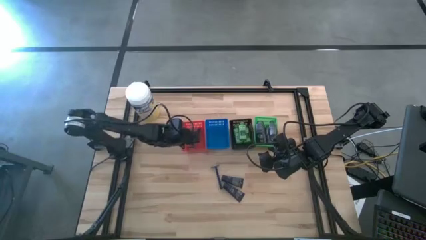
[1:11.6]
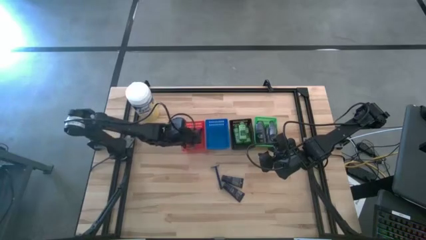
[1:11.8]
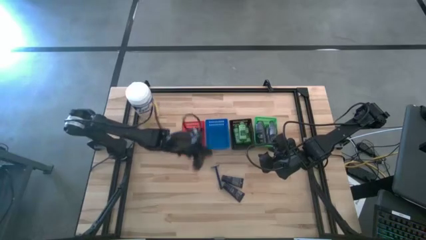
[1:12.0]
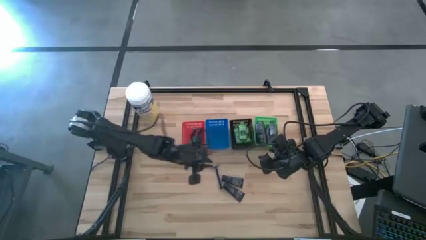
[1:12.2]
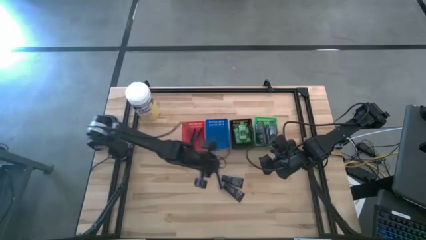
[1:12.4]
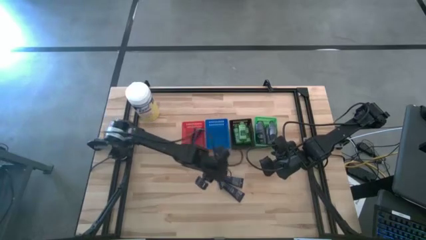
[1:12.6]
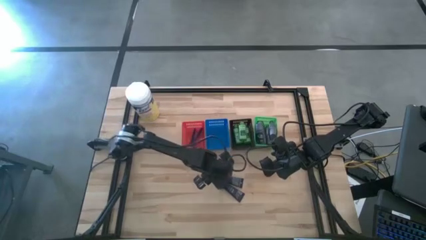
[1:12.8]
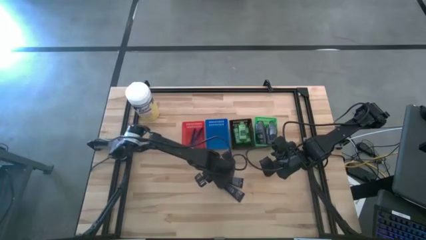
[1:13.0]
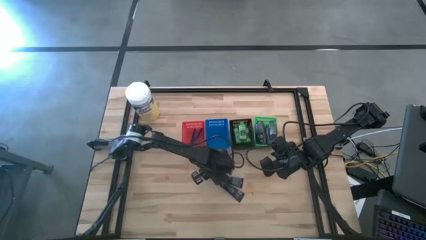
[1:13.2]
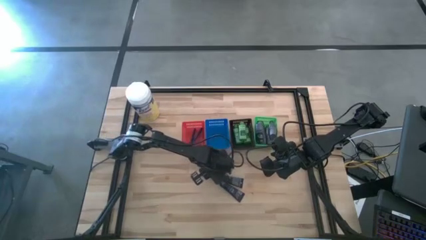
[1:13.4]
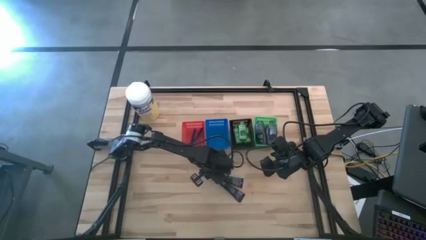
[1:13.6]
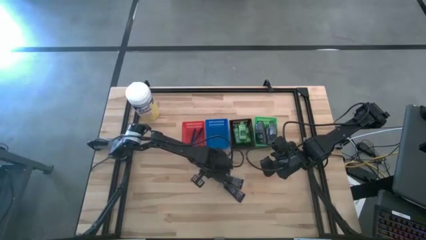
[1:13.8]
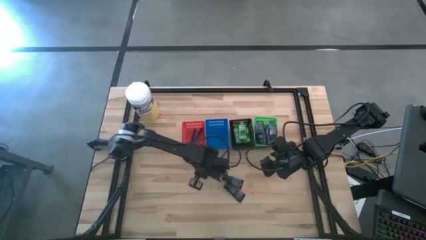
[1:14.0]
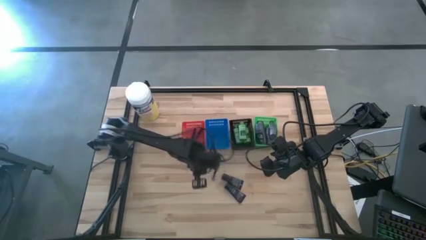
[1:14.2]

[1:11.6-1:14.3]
Task: Pick & Place Travel size toiletries
Put the razor into the red basket

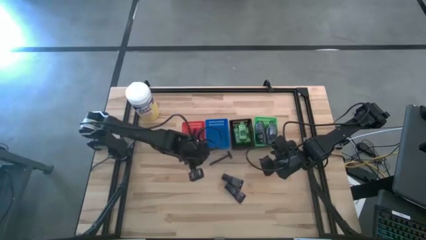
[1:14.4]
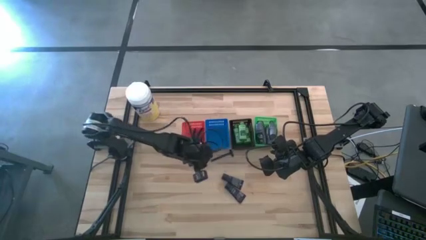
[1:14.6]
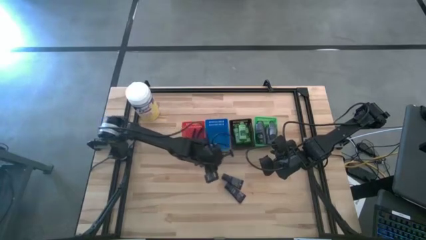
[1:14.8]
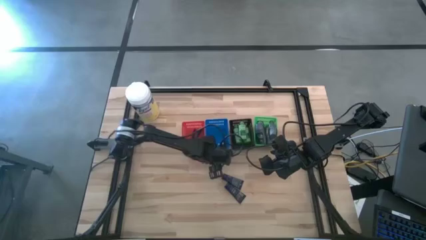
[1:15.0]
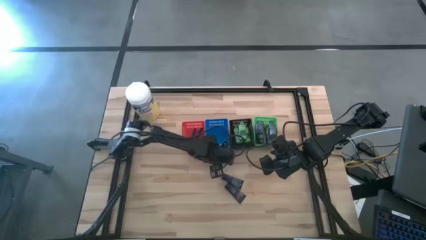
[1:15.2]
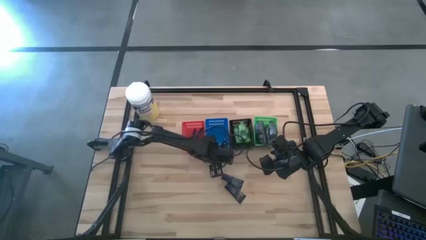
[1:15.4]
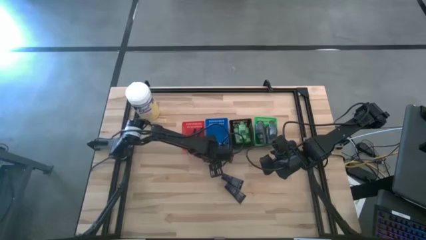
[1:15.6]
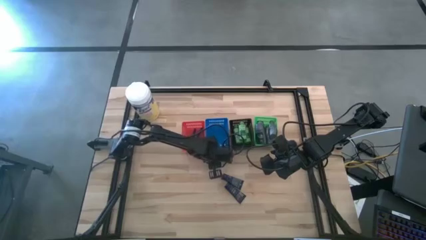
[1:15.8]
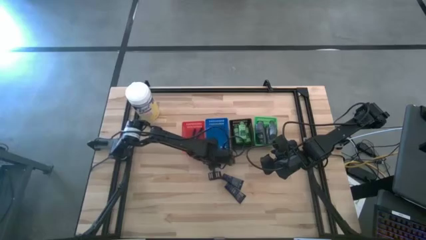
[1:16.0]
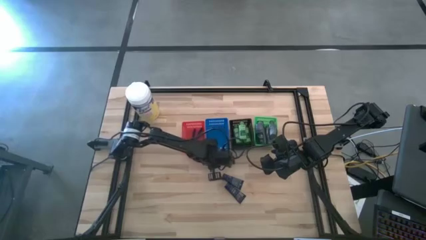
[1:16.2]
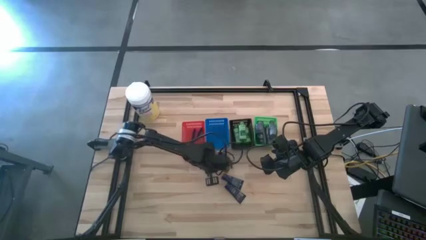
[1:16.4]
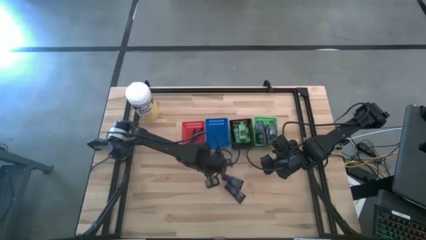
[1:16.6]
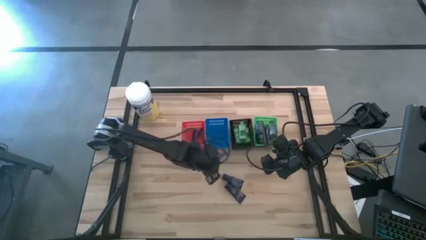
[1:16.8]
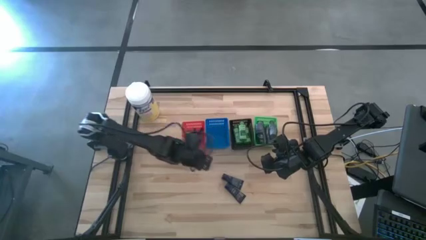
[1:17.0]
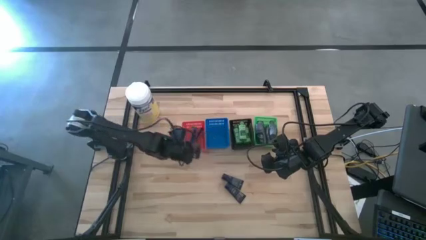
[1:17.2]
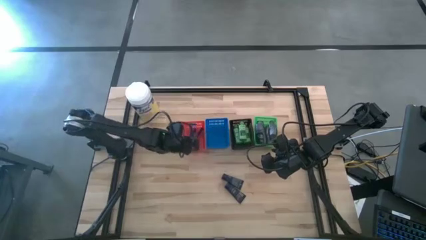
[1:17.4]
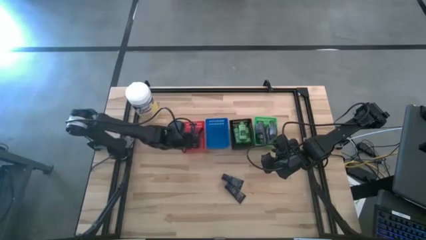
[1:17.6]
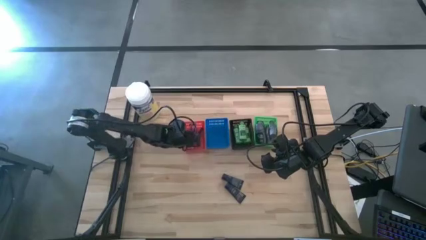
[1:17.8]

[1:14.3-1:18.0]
Put the razor into the red basket

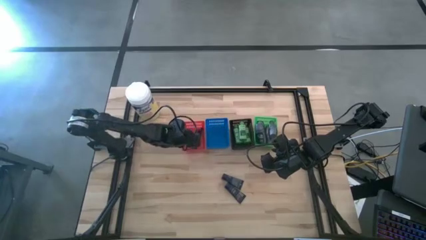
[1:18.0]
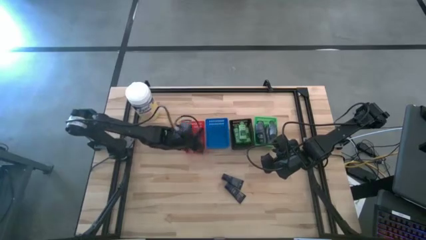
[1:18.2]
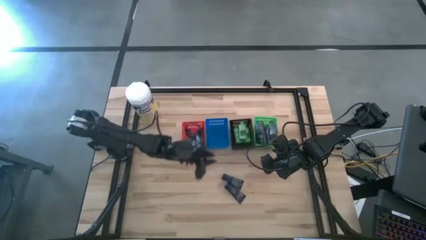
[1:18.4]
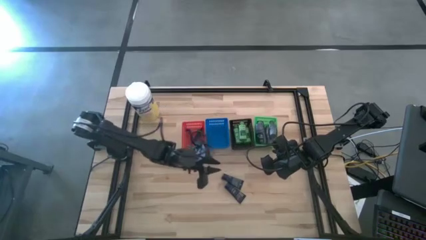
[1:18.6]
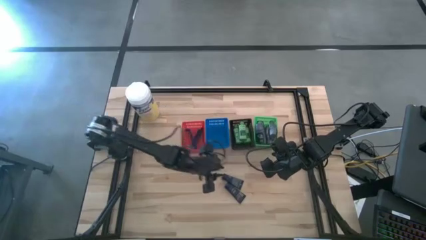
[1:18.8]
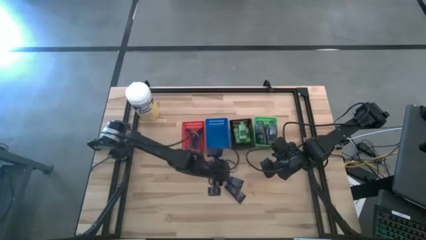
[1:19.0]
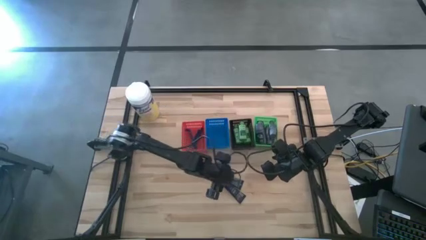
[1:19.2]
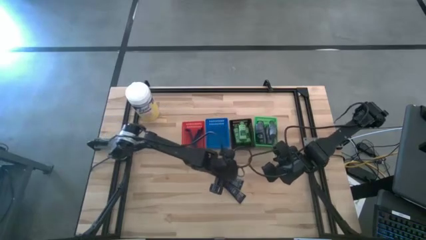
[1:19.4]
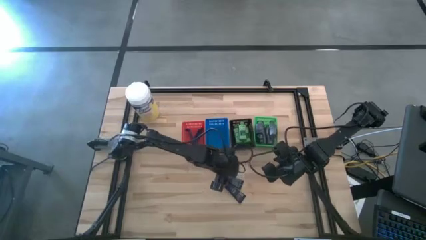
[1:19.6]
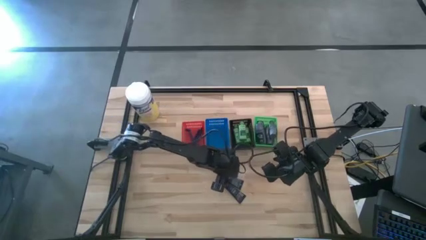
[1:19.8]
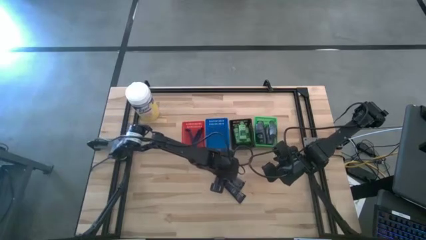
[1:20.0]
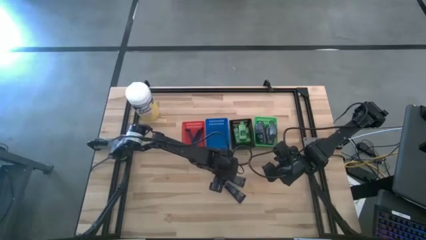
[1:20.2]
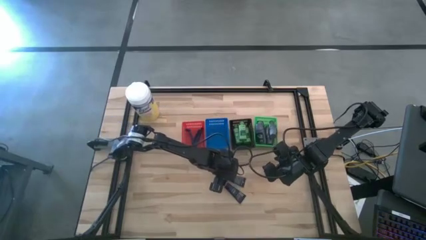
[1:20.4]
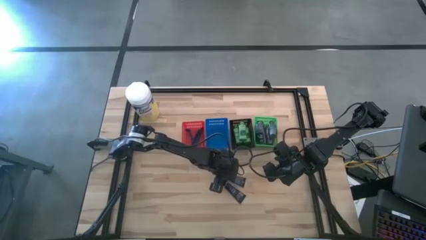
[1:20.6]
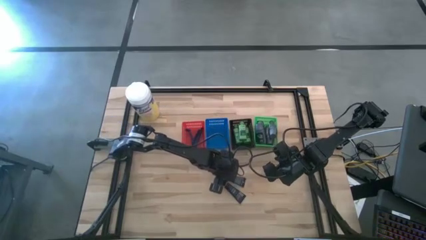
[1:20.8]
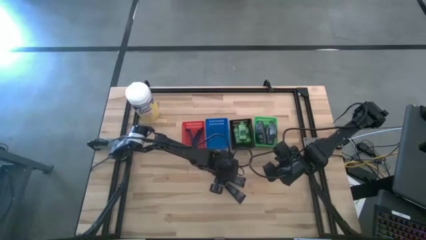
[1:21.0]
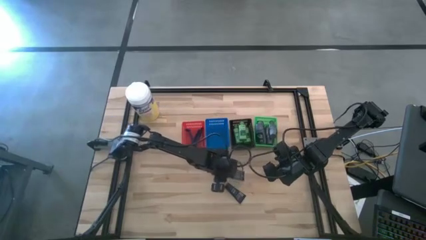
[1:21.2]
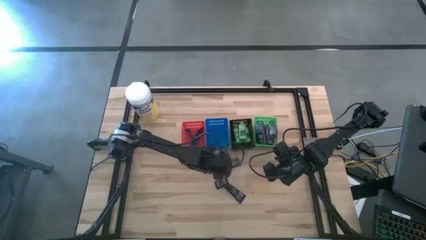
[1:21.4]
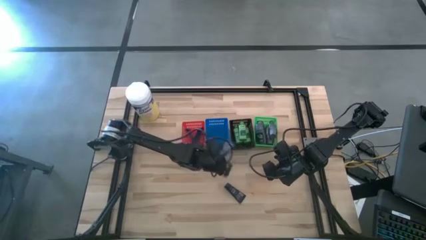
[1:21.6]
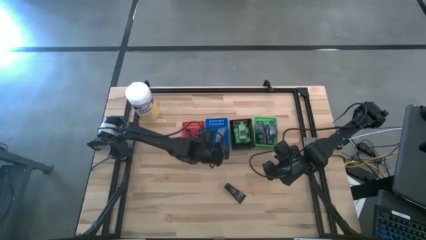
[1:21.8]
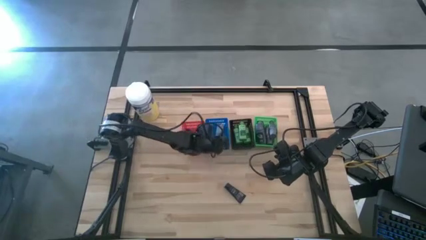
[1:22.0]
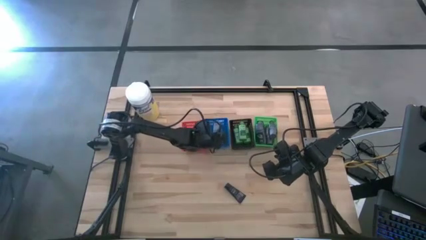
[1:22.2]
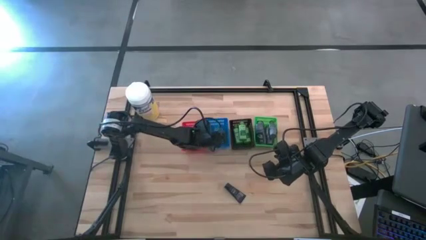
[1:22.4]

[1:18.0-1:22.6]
Put the shaving cream into the blue basket

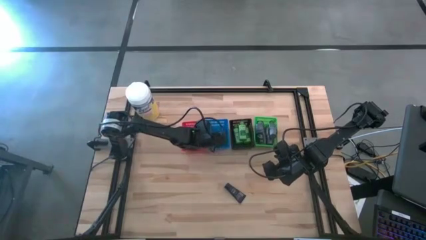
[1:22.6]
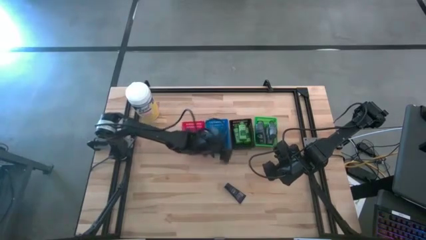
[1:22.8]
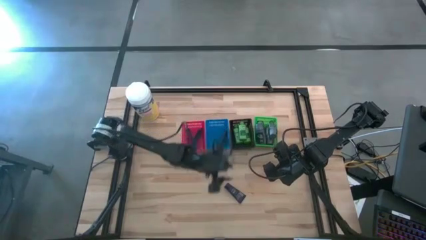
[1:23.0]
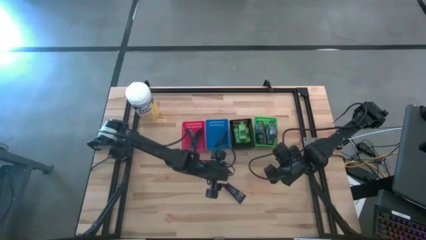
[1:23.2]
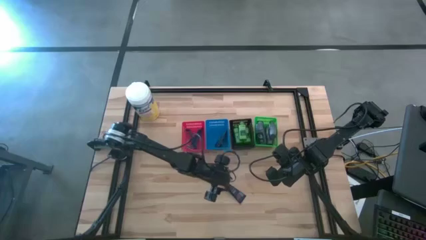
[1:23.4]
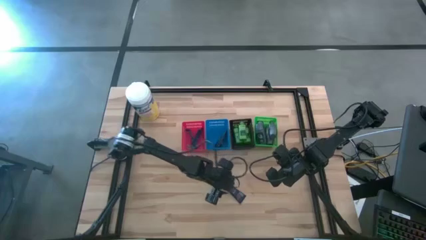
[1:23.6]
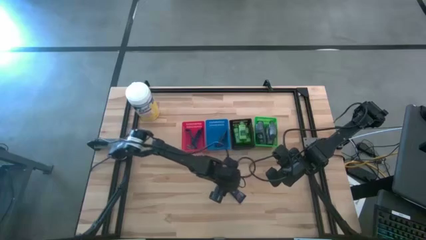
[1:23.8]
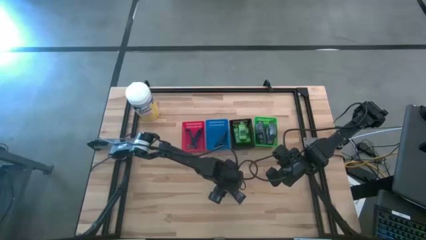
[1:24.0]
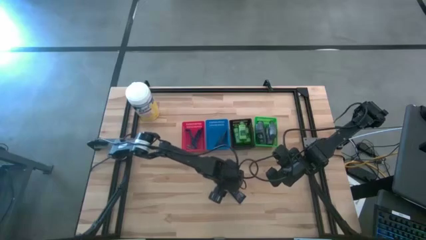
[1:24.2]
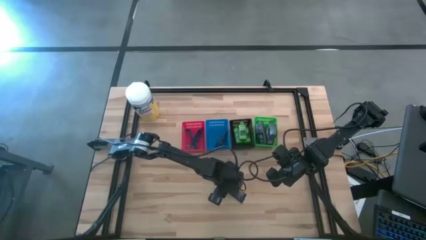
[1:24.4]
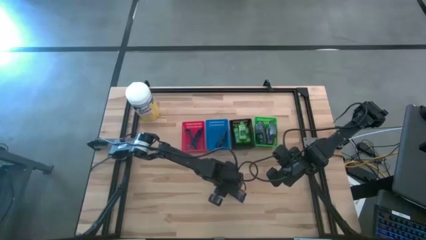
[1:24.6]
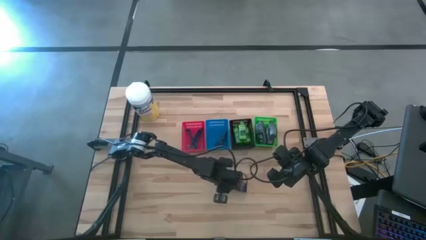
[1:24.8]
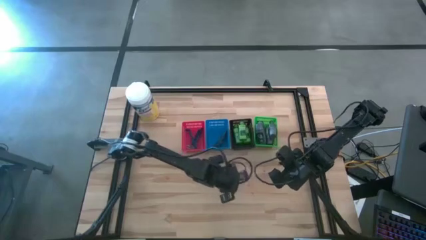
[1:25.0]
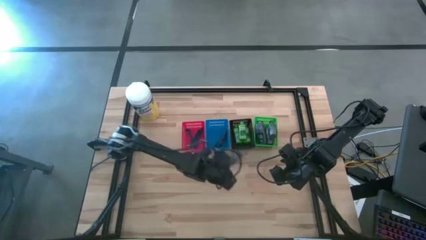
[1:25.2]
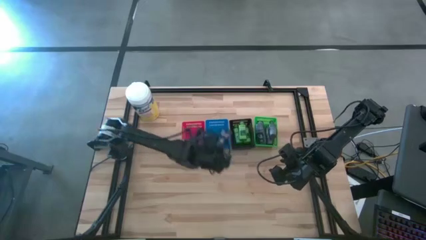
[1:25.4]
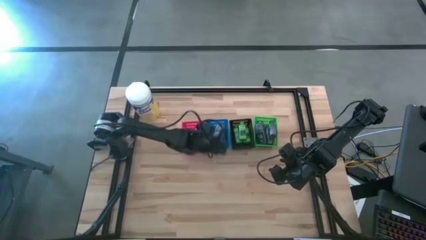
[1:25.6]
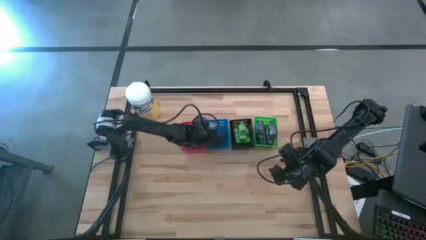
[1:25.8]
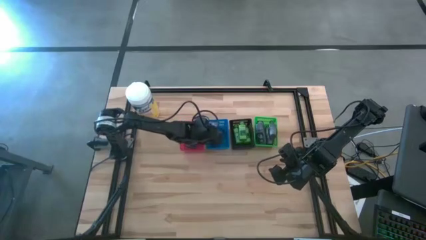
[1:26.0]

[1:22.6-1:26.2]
Put the shaving cream into the blue basket

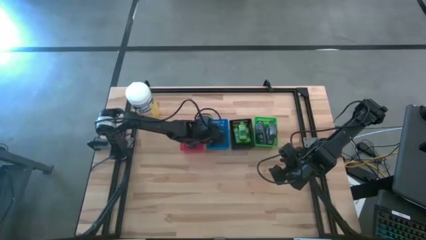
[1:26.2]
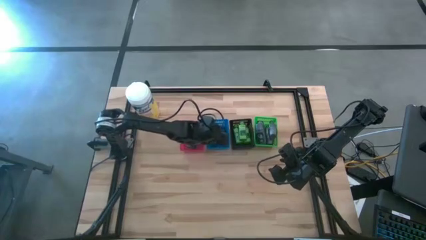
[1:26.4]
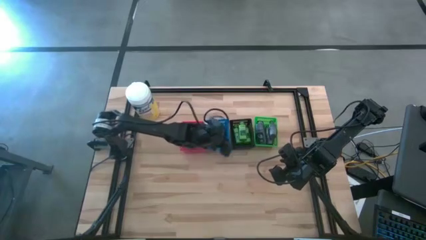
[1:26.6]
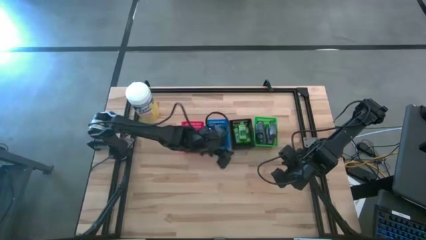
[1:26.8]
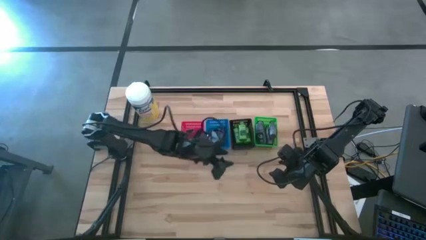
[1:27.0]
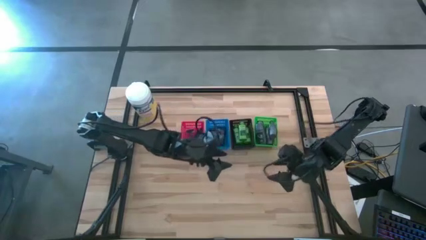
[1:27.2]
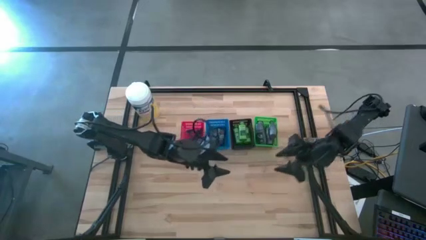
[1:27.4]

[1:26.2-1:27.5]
Return to Home Position

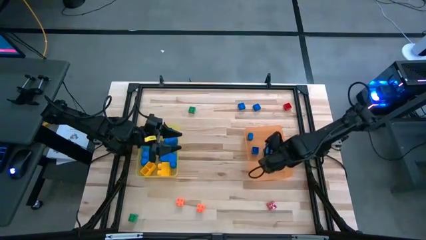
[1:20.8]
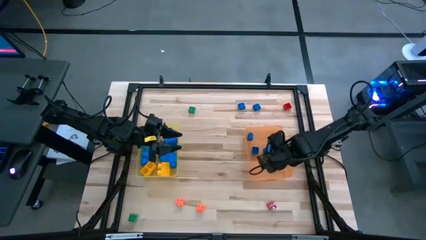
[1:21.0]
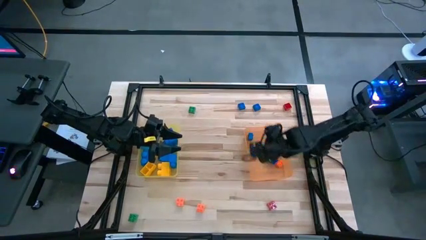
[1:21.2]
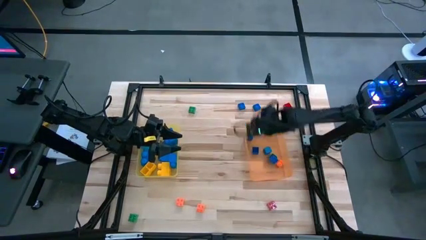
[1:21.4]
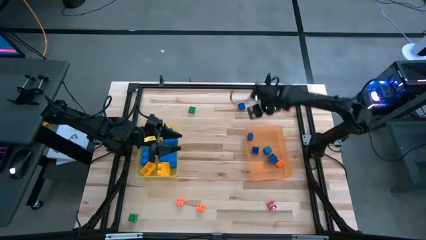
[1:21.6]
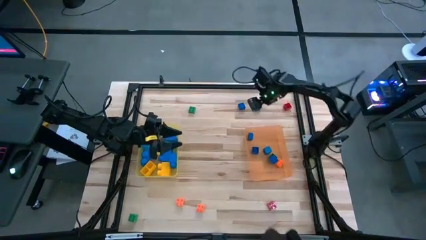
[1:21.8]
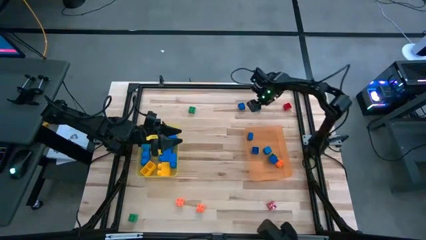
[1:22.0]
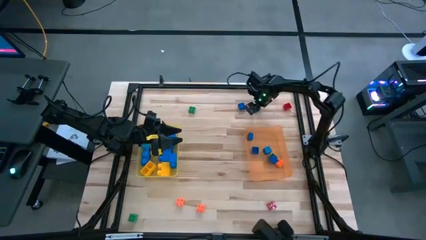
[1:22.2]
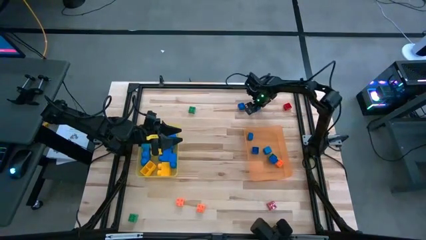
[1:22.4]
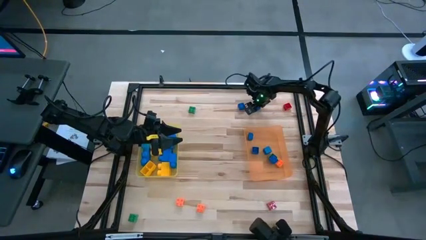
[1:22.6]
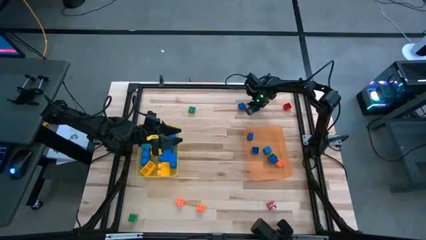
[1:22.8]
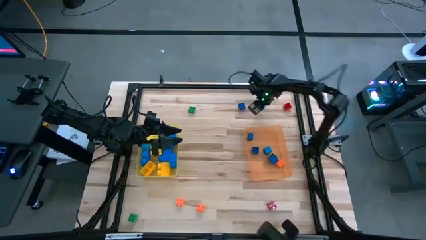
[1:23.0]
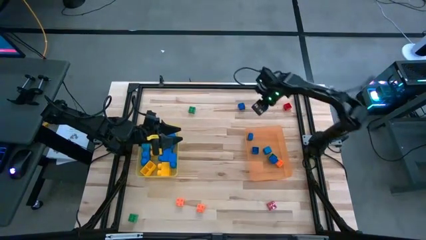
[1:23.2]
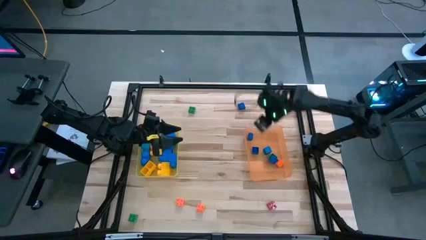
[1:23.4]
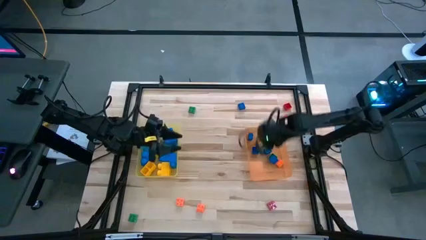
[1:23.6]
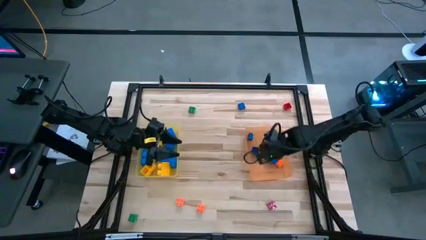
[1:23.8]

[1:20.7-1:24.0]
Task: Sort blocks by size
Put the small blue game piece into the orange bin
